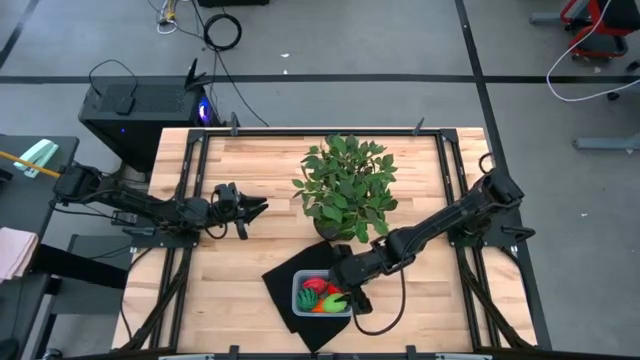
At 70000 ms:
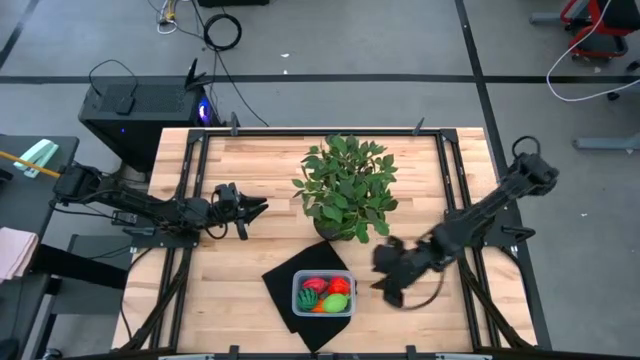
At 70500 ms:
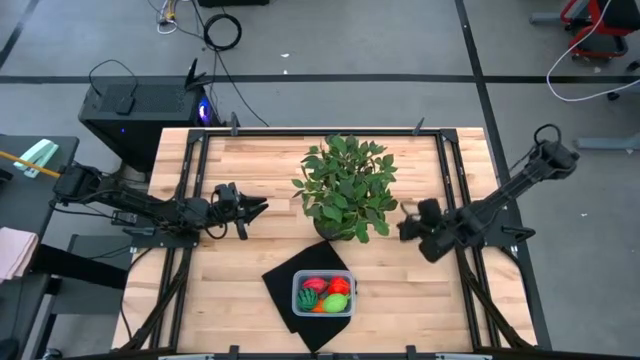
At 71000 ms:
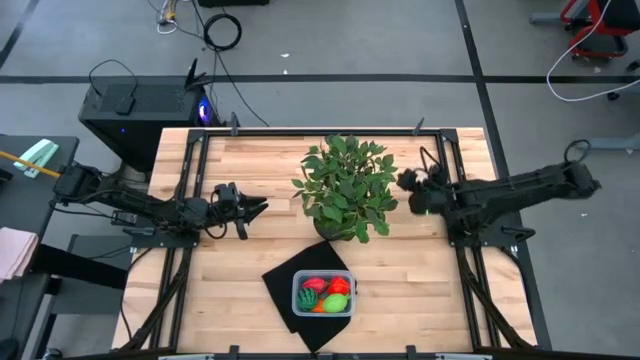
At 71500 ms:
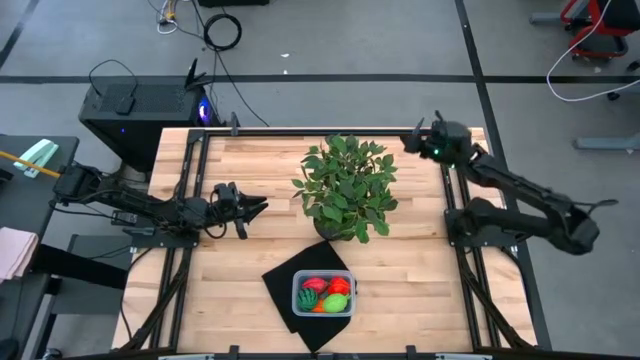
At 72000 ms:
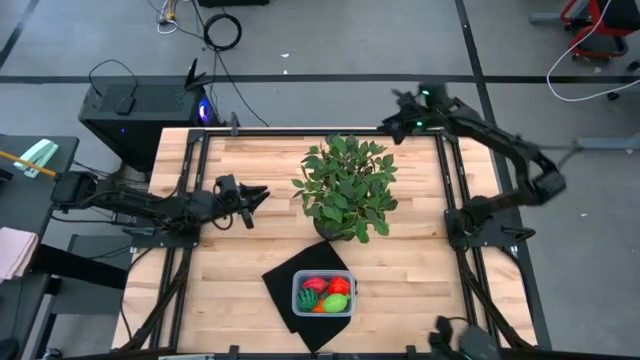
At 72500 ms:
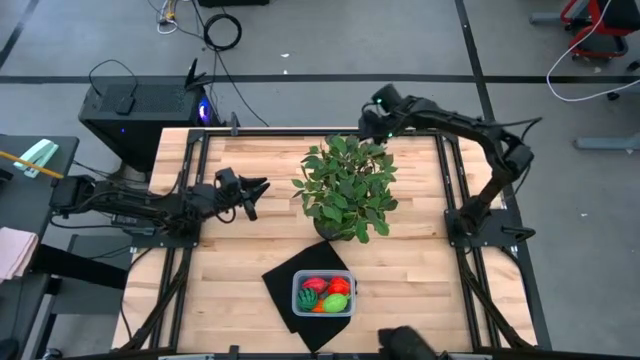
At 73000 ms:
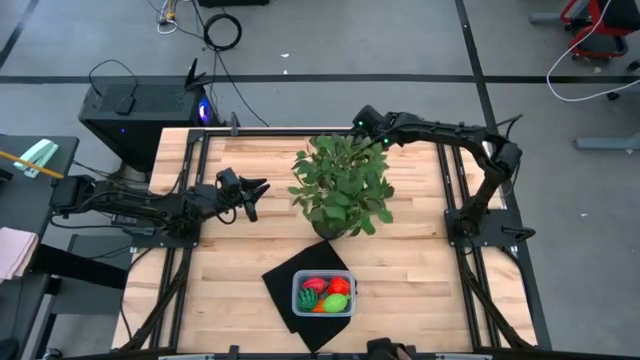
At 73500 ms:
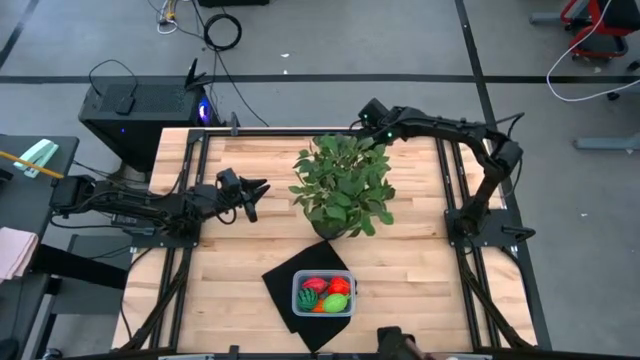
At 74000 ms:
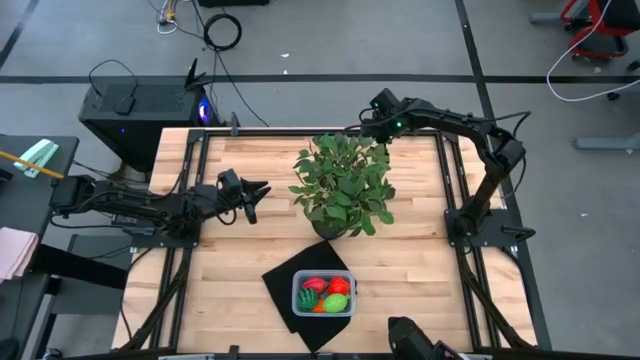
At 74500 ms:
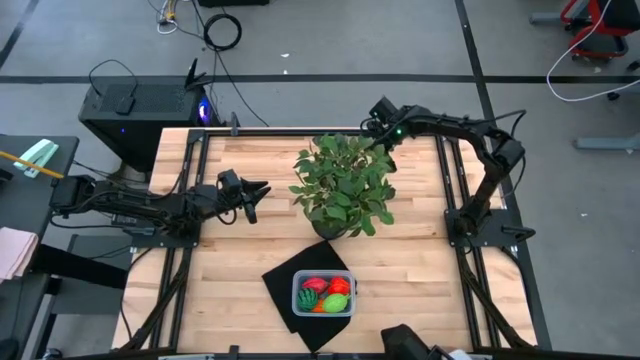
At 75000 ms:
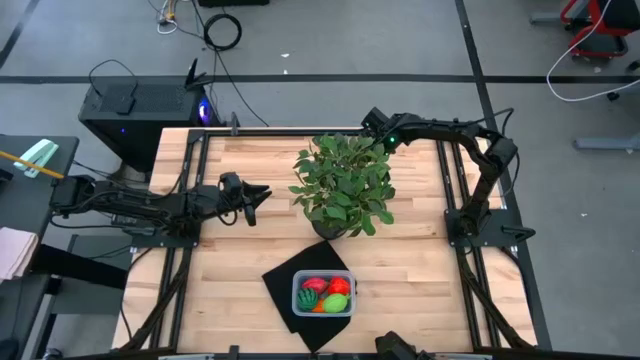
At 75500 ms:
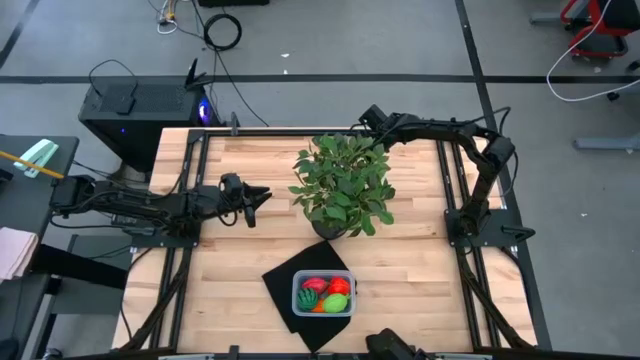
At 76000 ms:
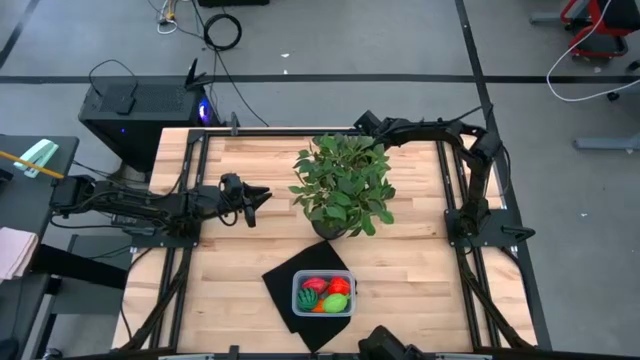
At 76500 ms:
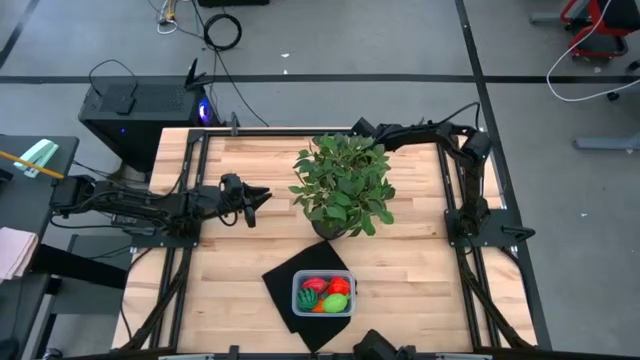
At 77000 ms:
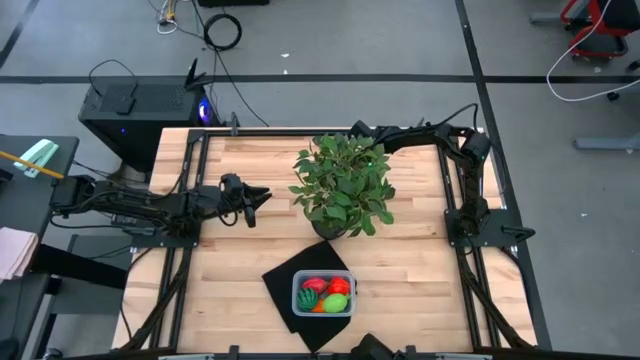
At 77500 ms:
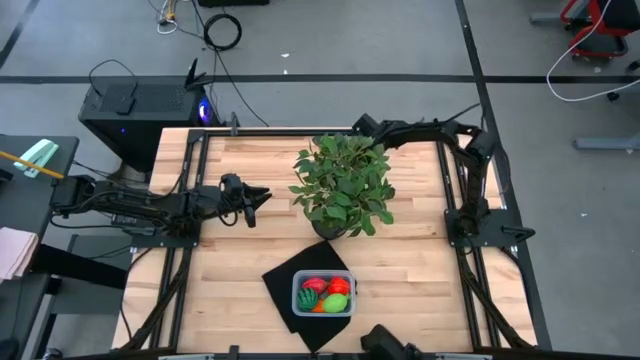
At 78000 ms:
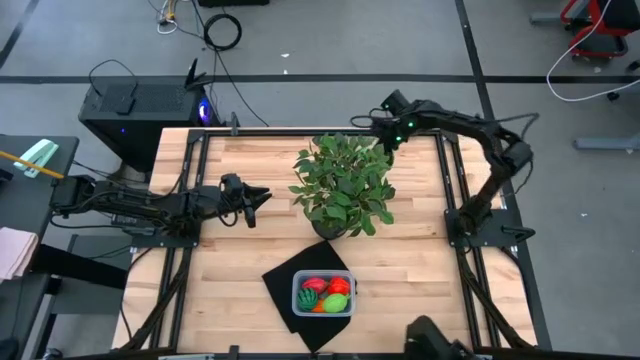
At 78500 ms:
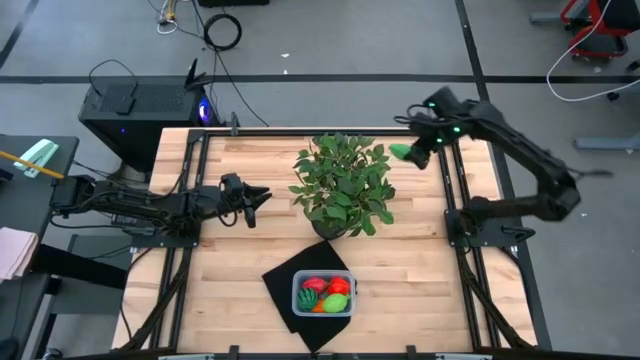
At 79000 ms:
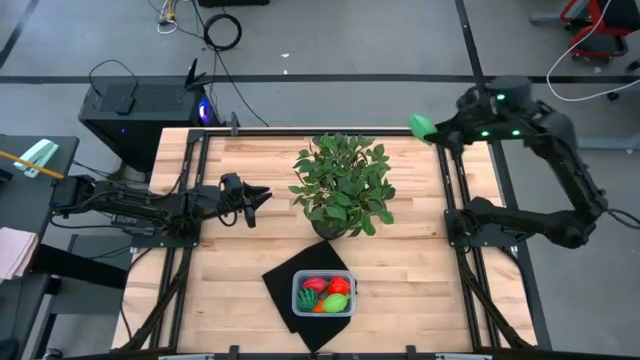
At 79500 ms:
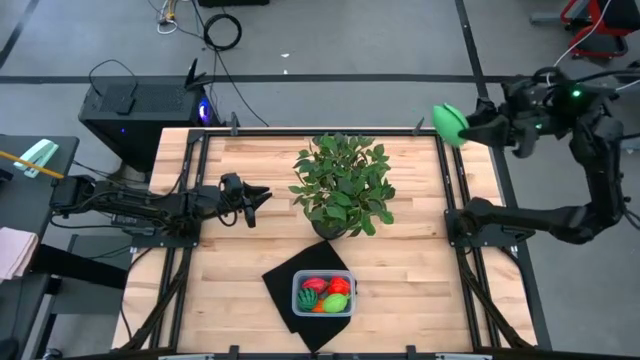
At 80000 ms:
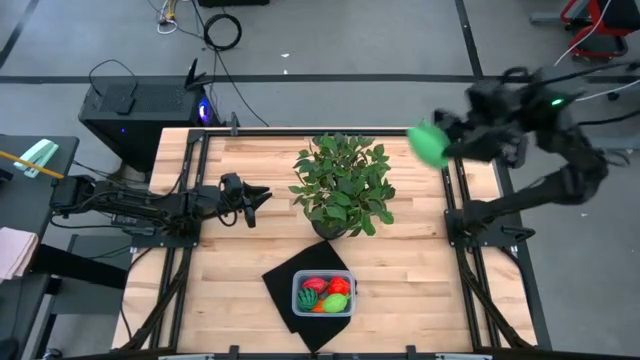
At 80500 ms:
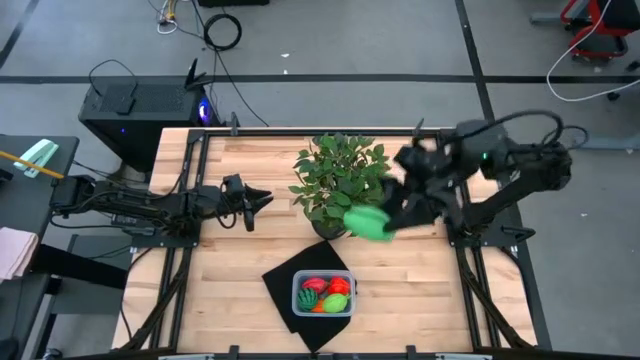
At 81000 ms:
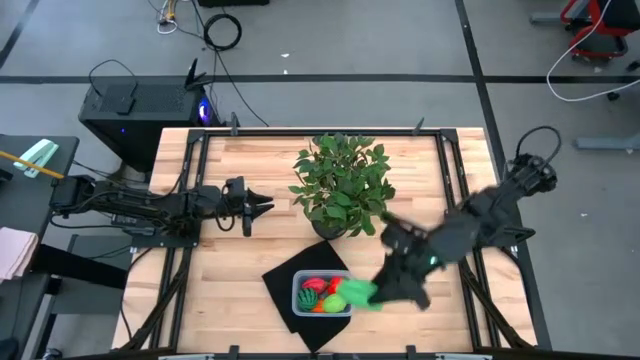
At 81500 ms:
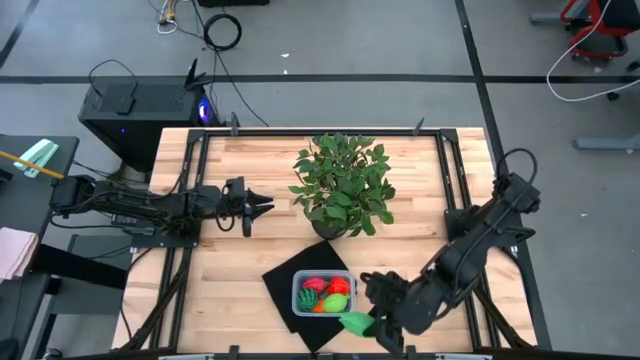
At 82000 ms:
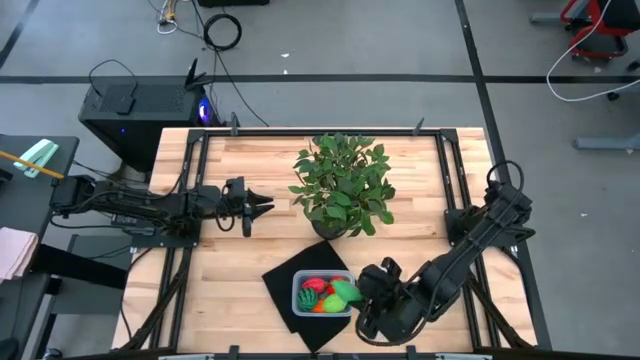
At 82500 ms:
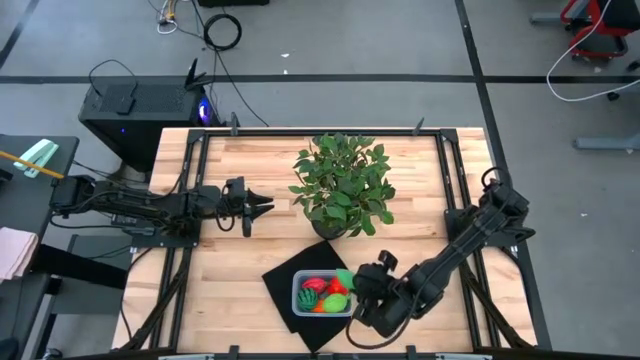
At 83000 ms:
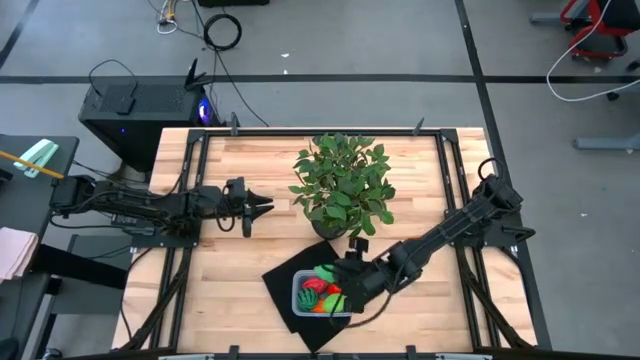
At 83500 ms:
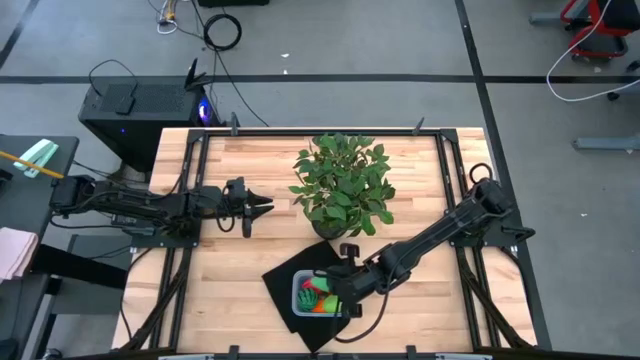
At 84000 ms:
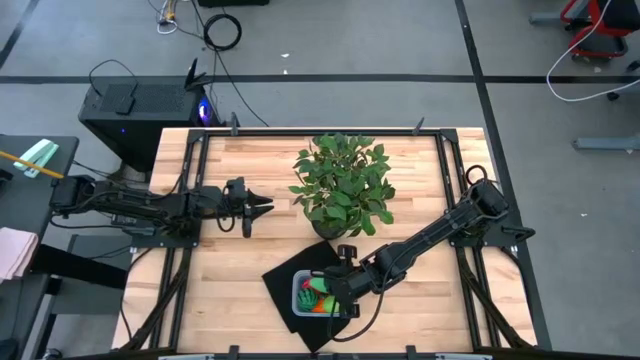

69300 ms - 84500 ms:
Task: Pick and placing Produce into tupperware
Put the green corn into the transparent bin

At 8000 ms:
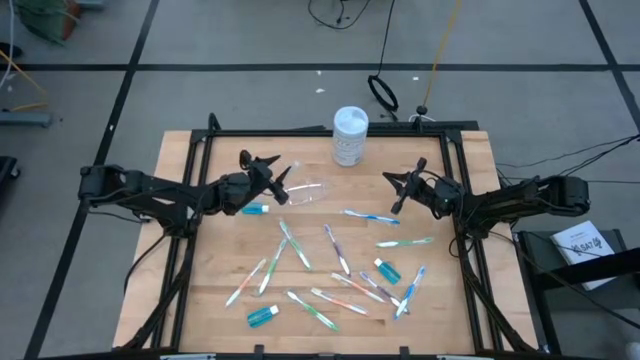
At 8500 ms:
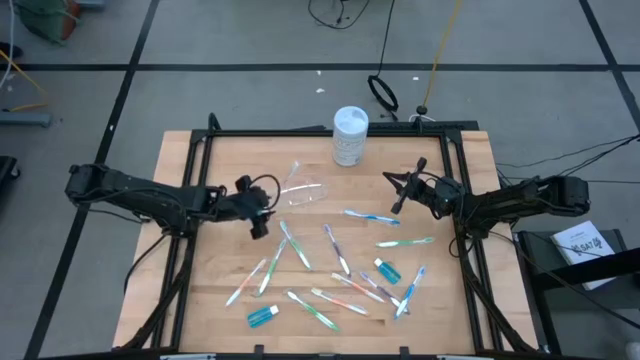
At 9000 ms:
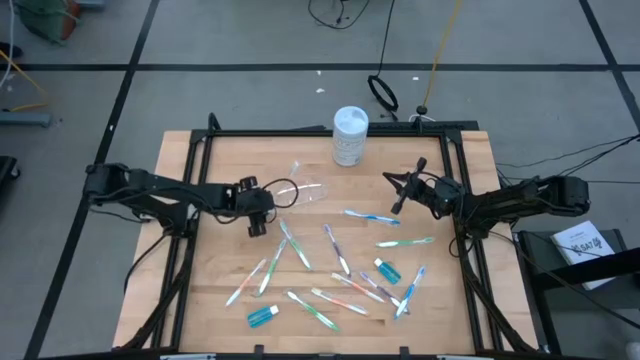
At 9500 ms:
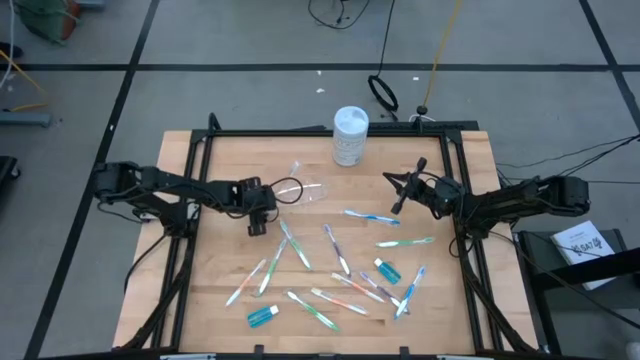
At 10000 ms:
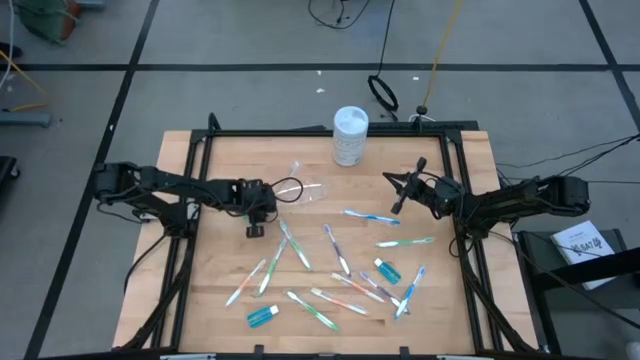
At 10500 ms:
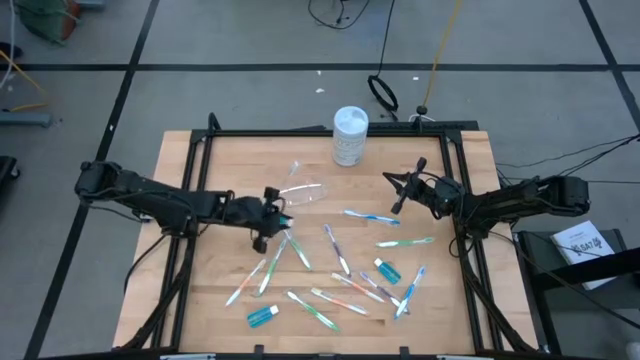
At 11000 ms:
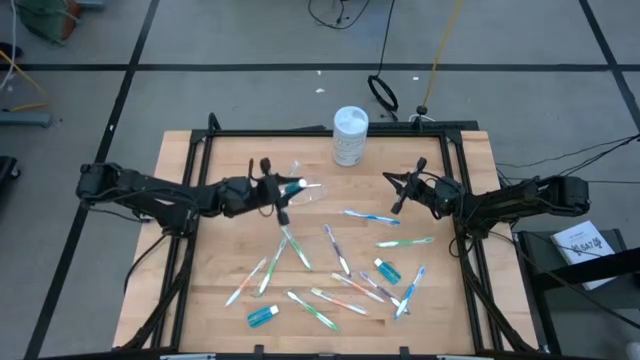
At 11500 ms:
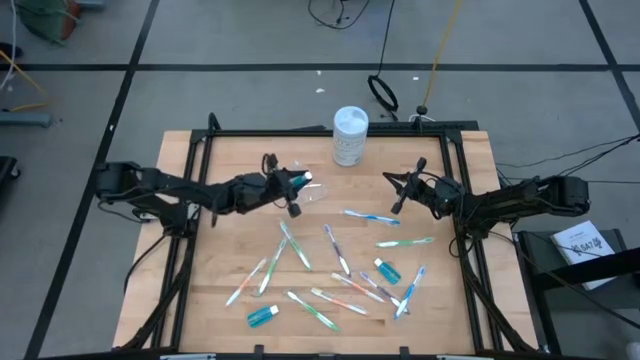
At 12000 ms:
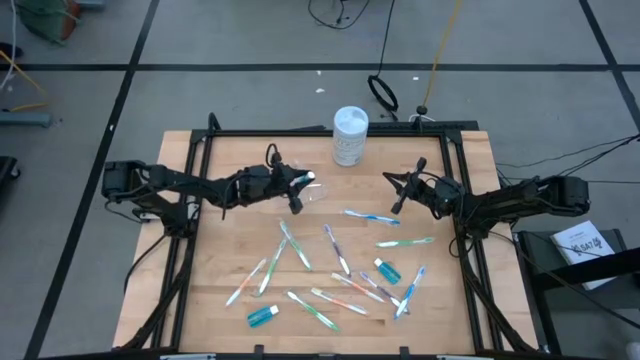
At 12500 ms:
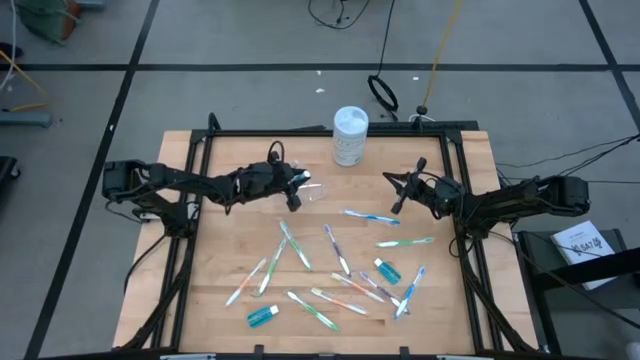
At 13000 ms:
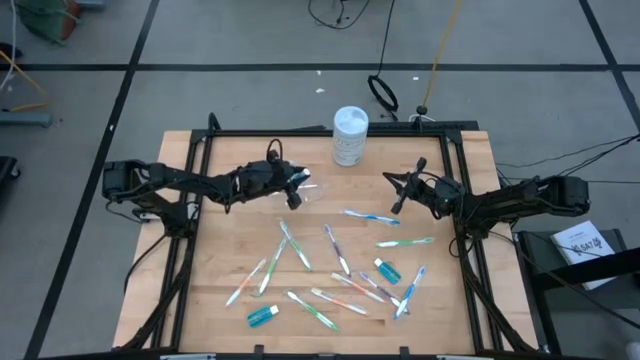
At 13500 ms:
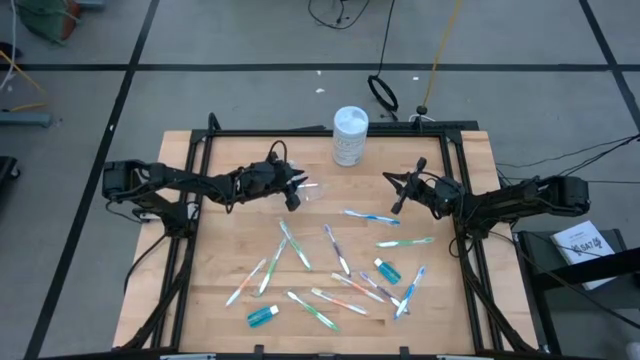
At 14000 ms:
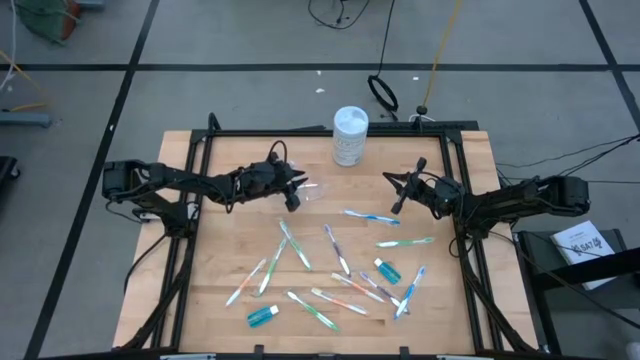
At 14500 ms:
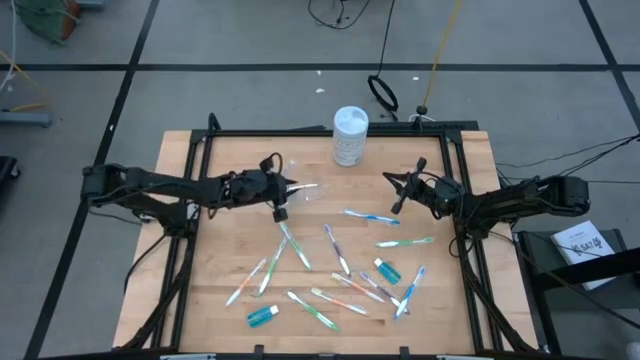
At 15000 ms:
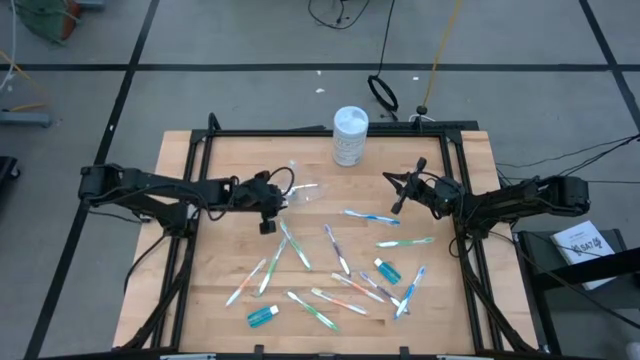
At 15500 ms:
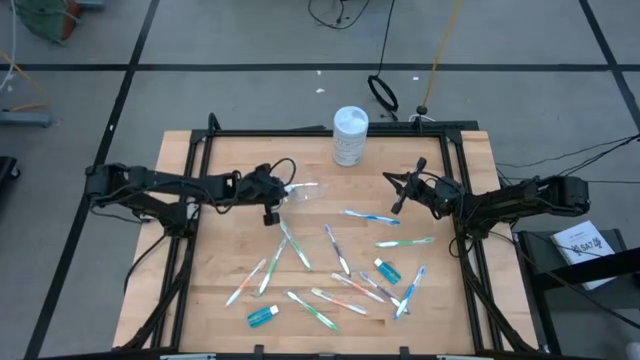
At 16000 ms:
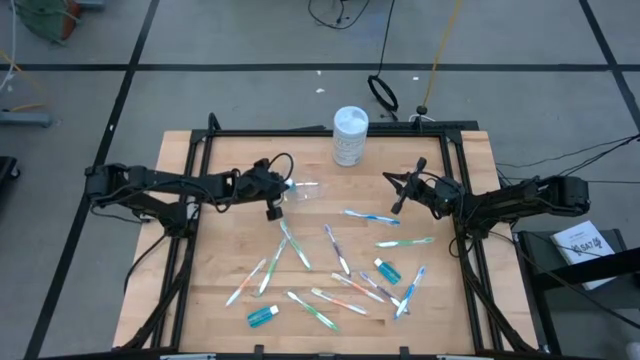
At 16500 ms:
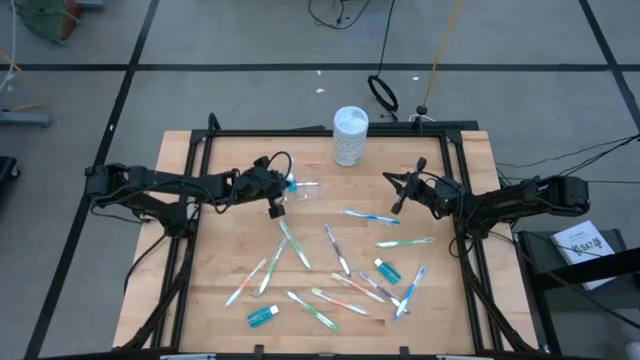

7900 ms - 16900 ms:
Task: Pick & Place toothbrushing station
Put the blue mouthwash bottle into the transparent organizer
